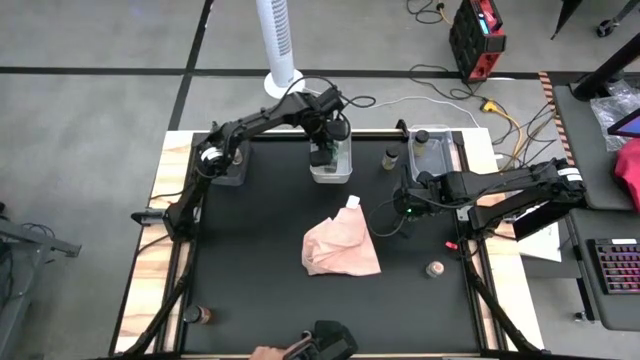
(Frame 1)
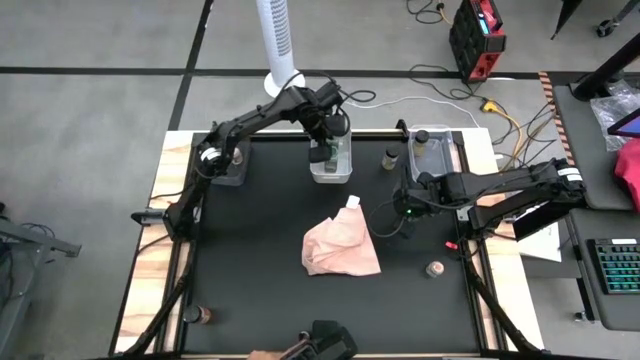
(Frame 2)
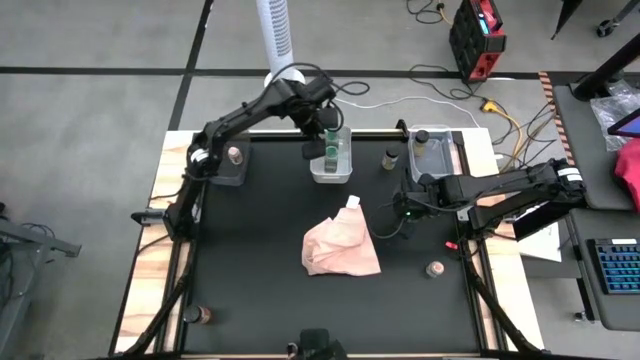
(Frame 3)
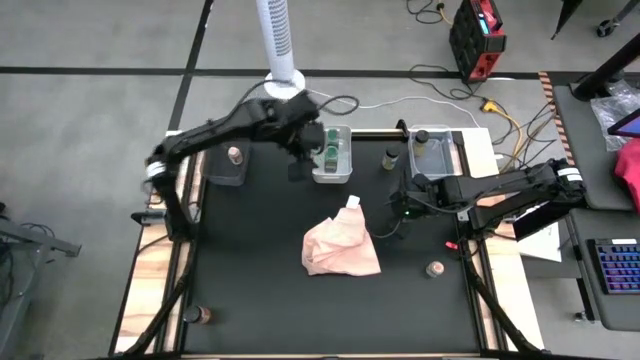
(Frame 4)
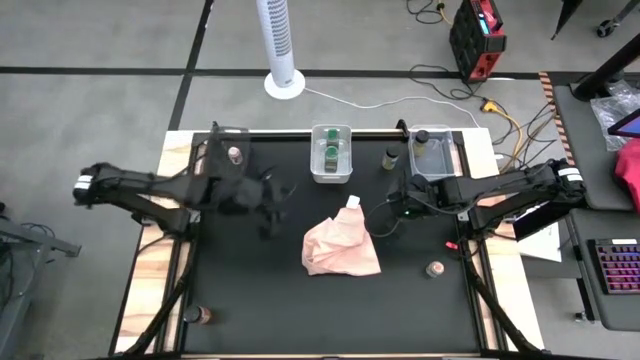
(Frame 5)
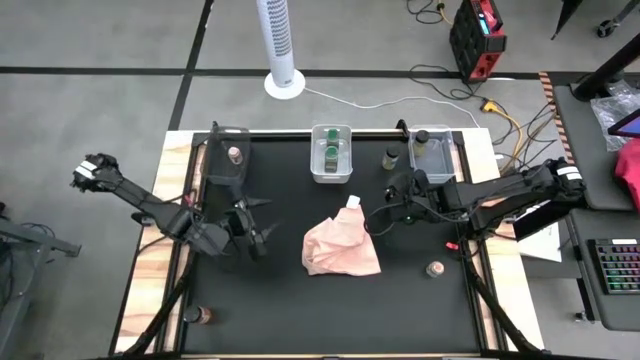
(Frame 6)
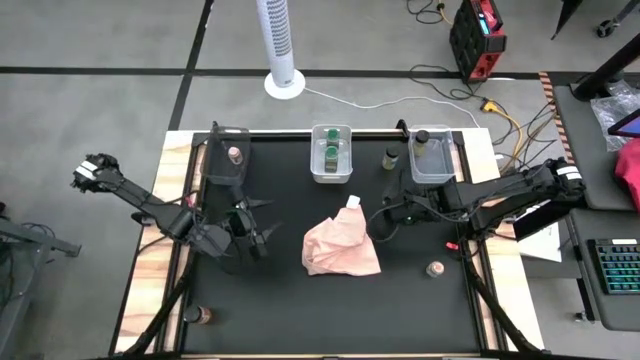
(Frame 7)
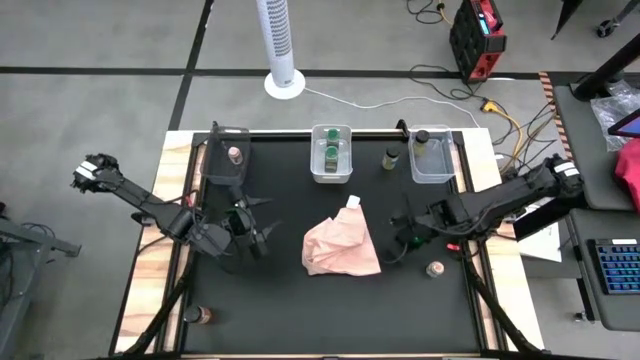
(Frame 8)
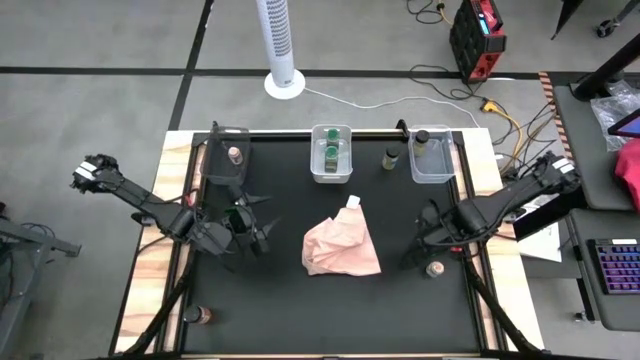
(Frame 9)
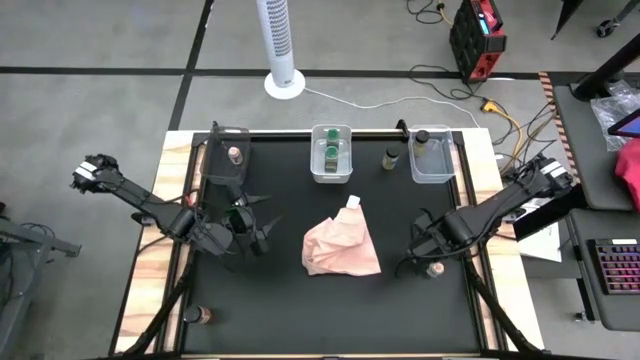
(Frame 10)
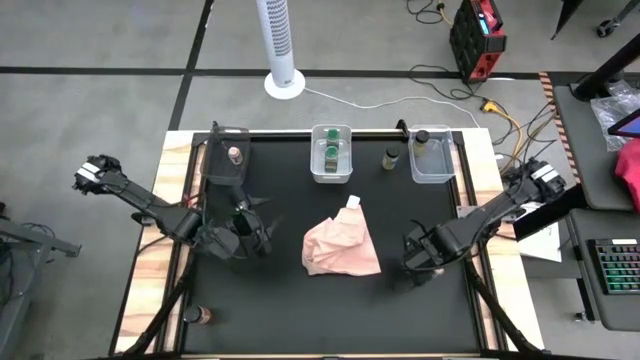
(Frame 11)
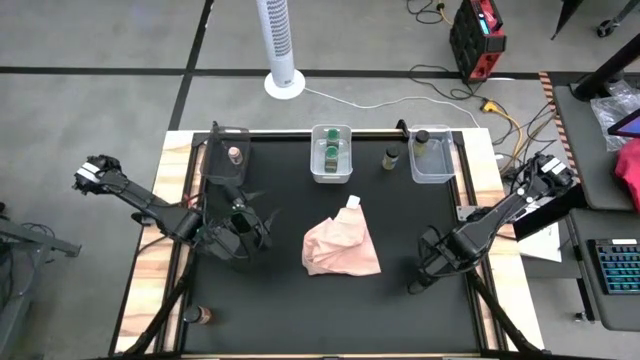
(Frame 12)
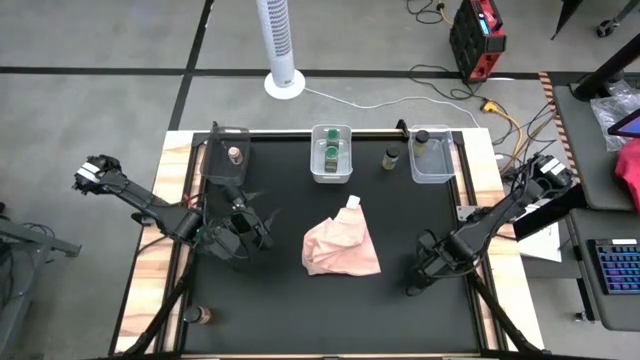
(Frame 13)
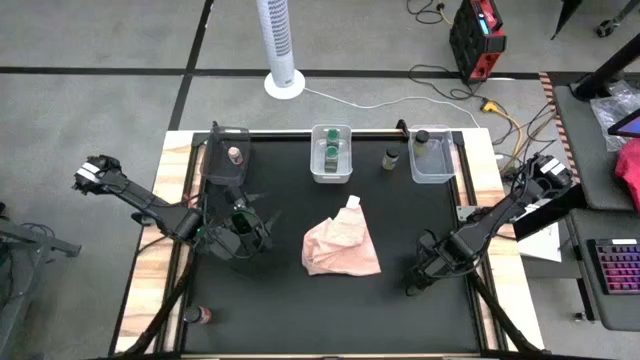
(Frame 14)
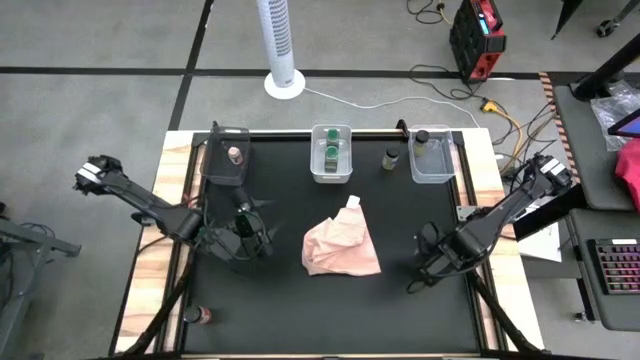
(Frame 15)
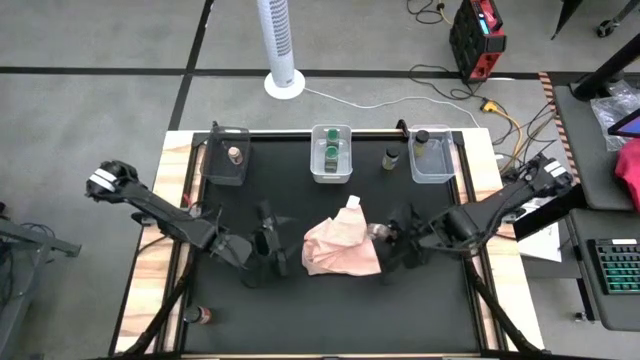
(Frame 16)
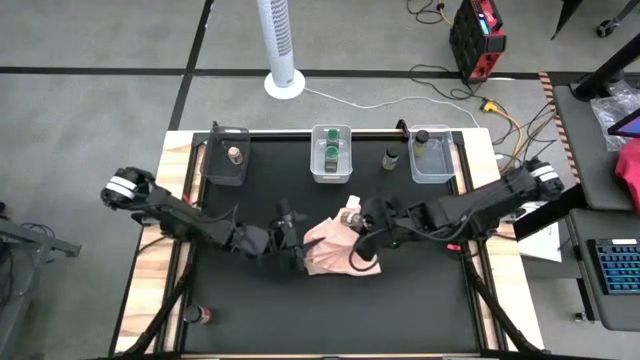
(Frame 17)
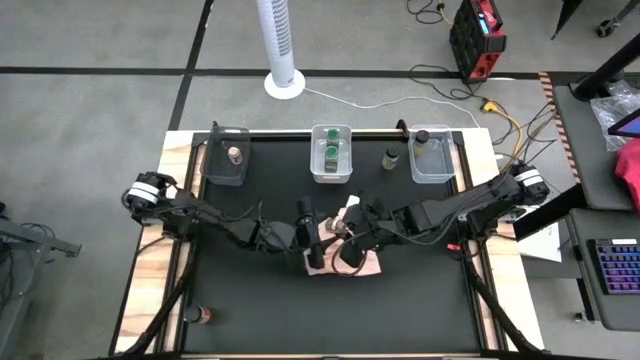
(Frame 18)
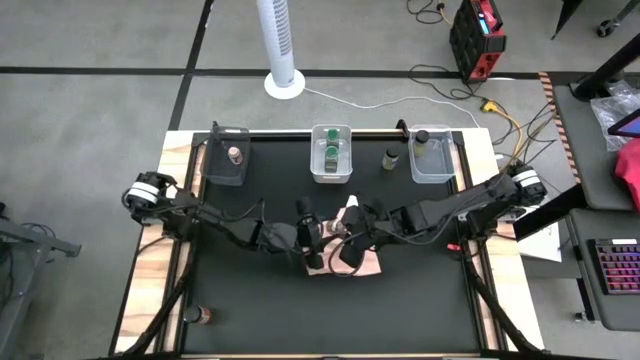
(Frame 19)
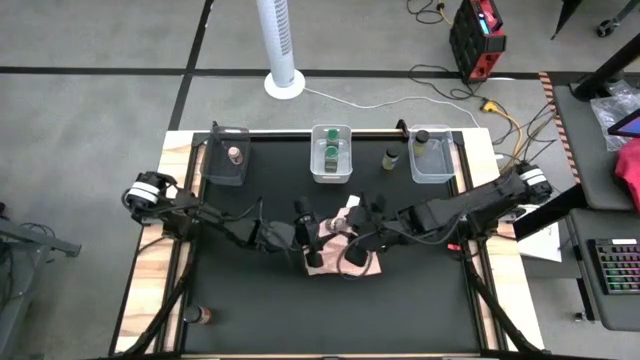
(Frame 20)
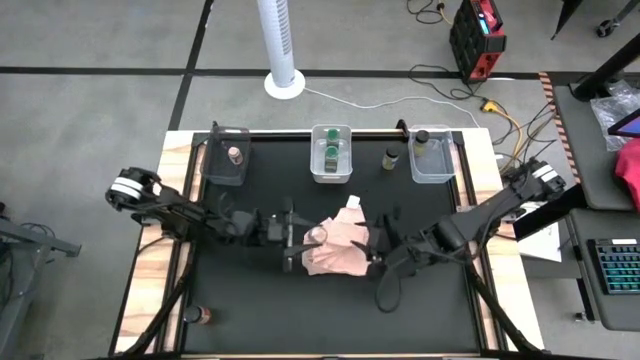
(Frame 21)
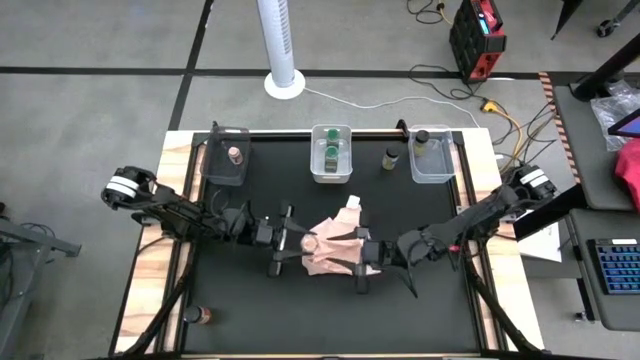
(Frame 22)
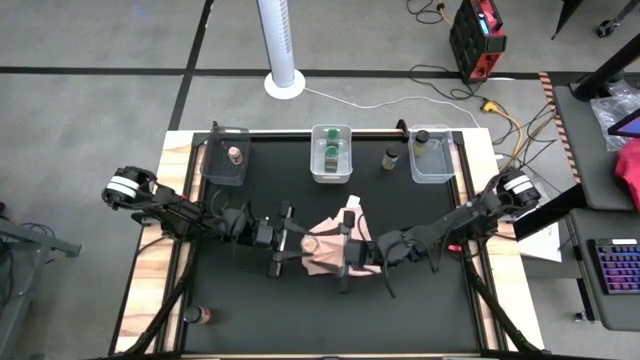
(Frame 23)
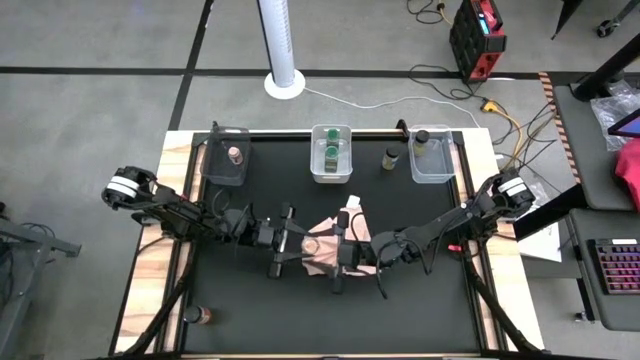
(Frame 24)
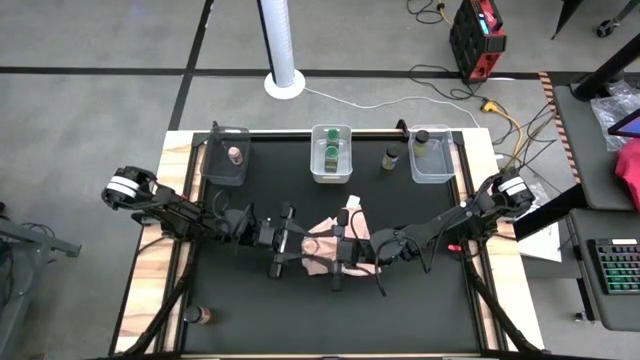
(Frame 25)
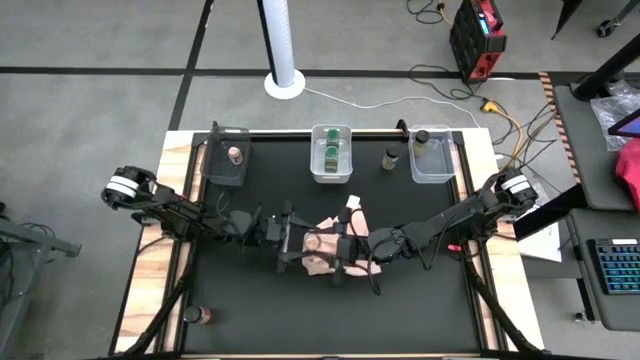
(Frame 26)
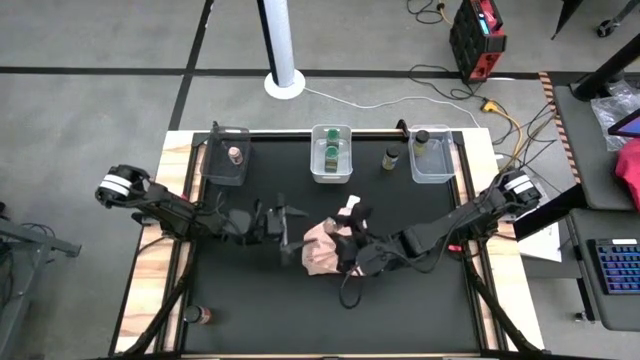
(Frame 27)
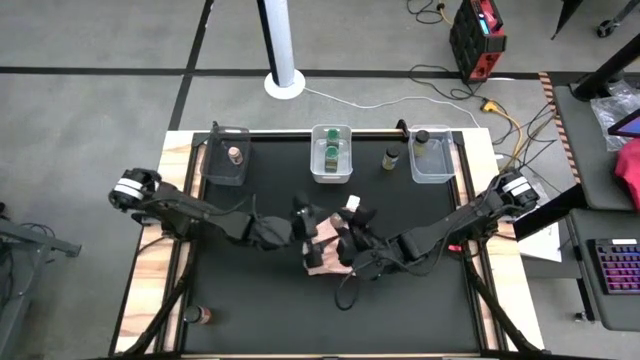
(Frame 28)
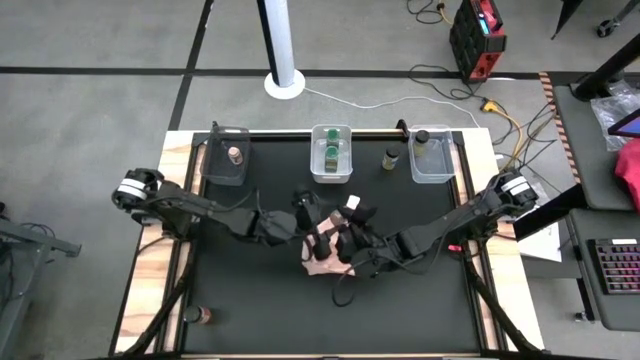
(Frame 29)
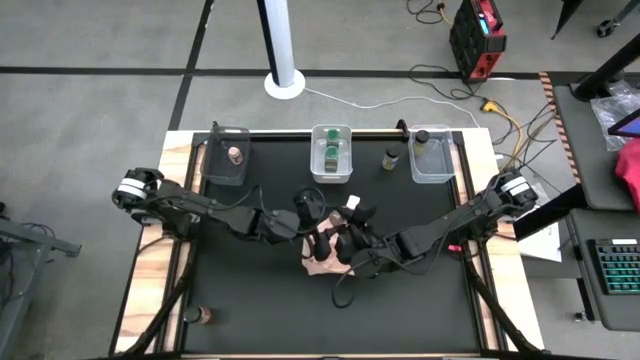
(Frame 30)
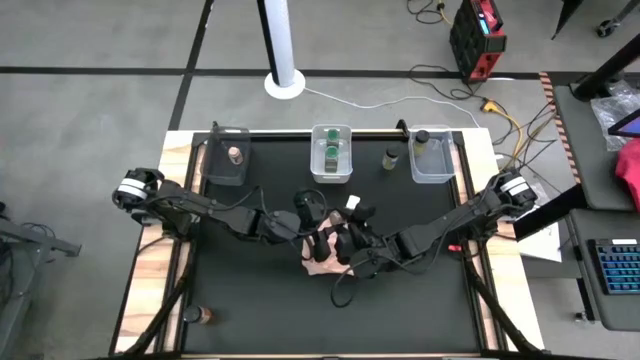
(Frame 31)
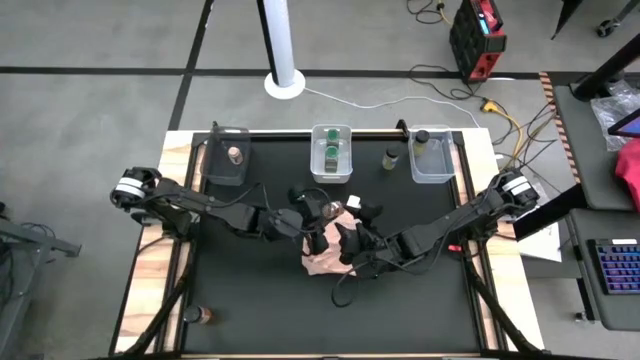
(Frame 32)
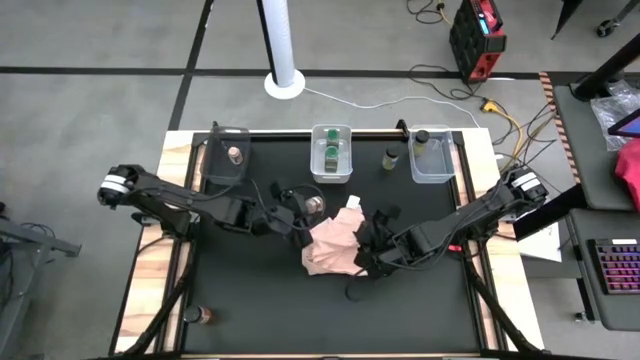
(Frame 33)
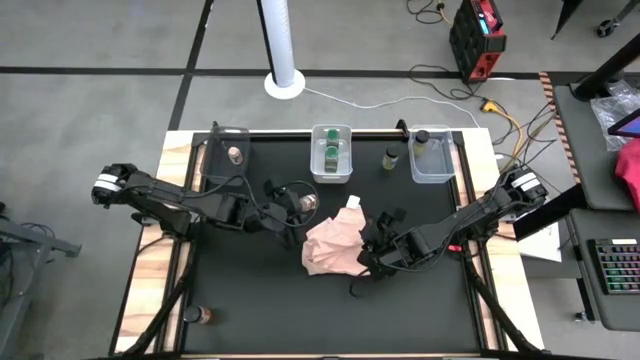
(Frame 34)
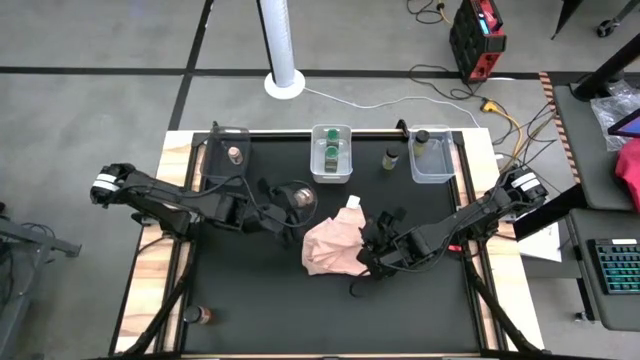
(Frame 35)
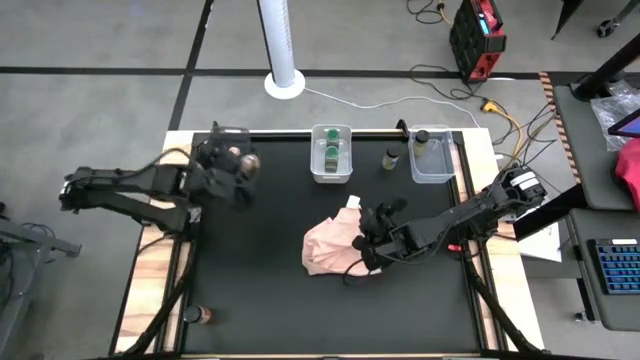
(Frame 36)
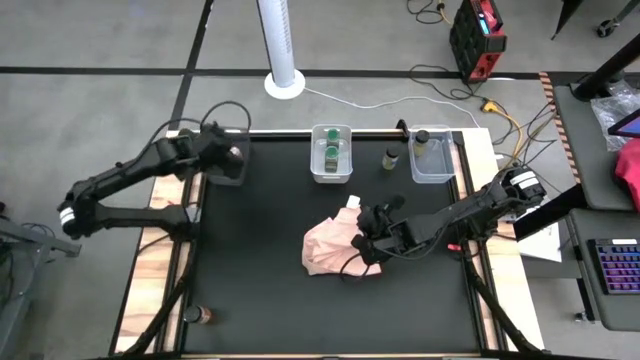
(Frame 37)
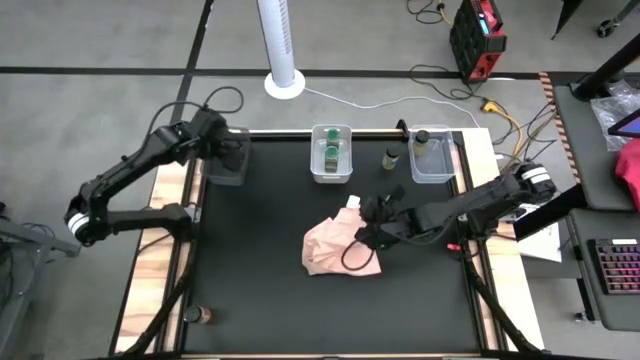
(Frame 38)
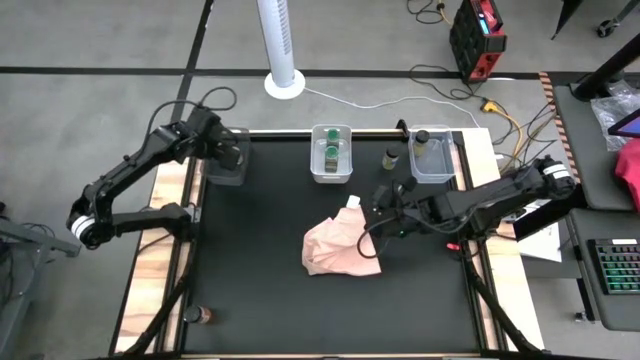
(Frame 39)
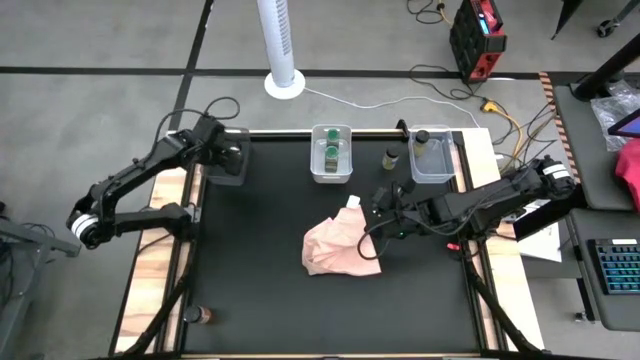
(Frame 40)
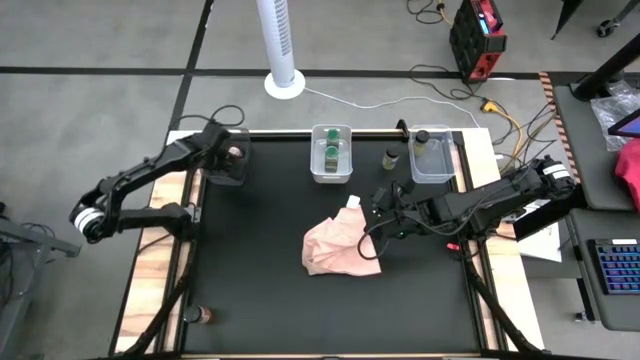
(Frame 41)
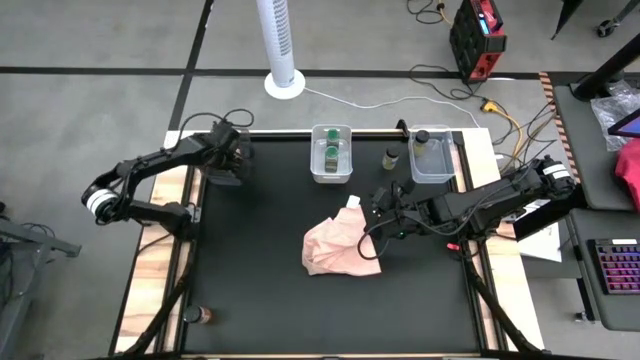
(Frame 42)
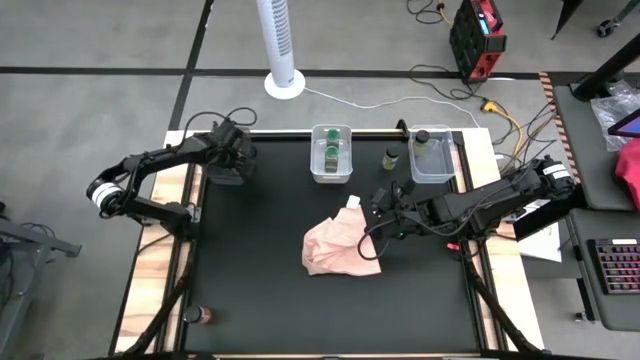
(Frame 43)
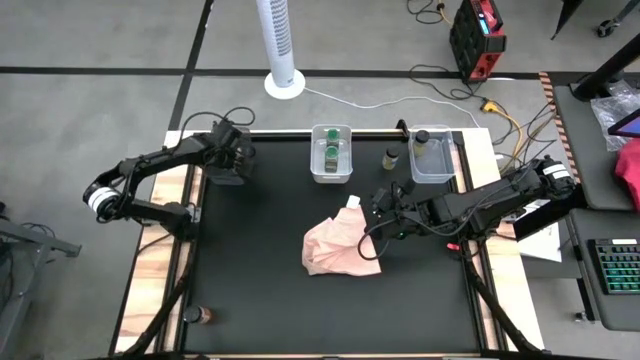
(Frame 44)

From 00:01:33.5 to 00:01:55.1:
Task: Sort spices by type
Put the brown spice bottle into the black bin
